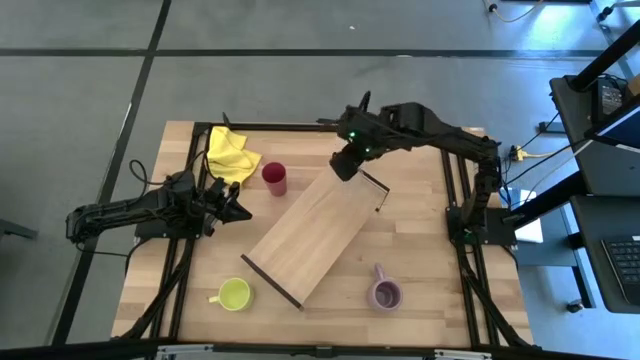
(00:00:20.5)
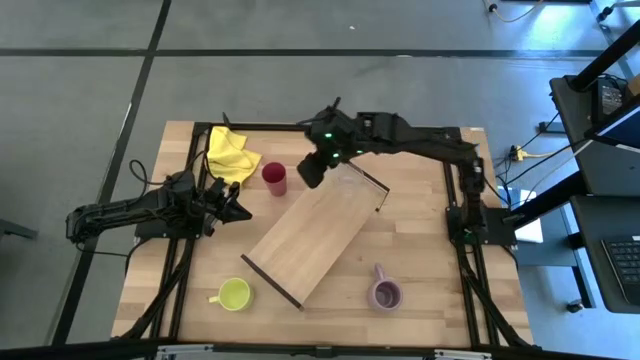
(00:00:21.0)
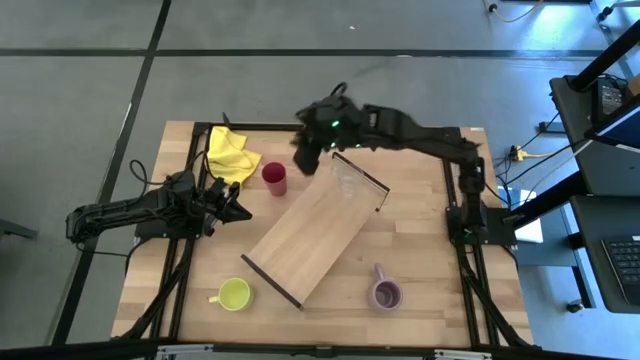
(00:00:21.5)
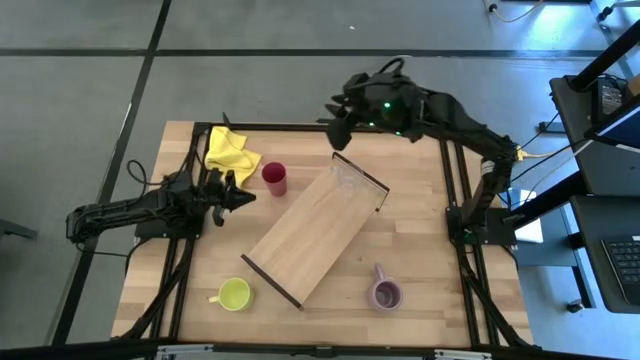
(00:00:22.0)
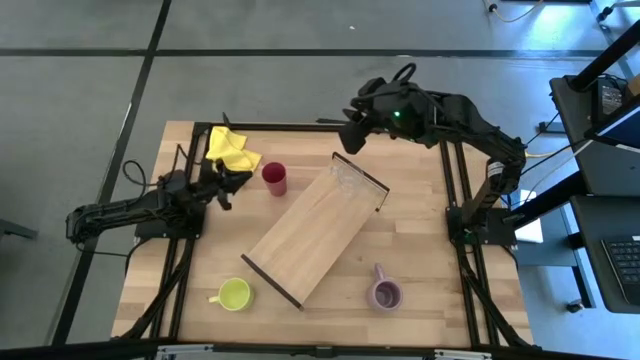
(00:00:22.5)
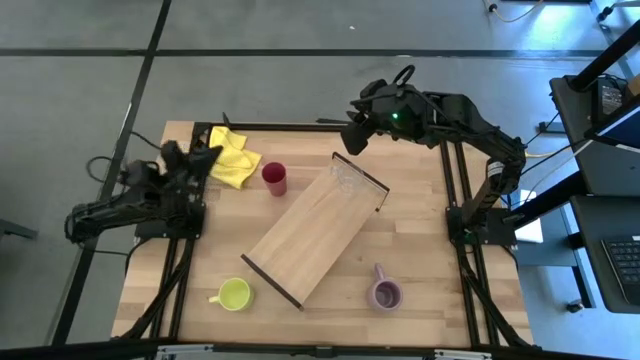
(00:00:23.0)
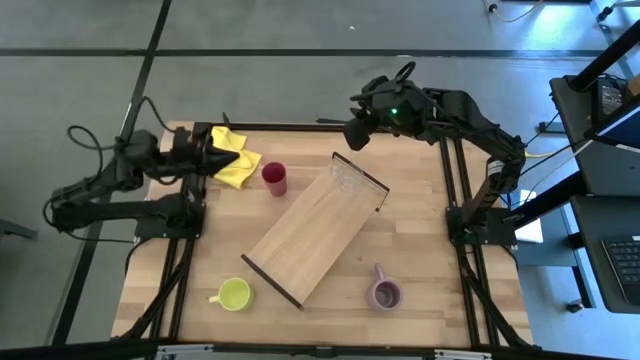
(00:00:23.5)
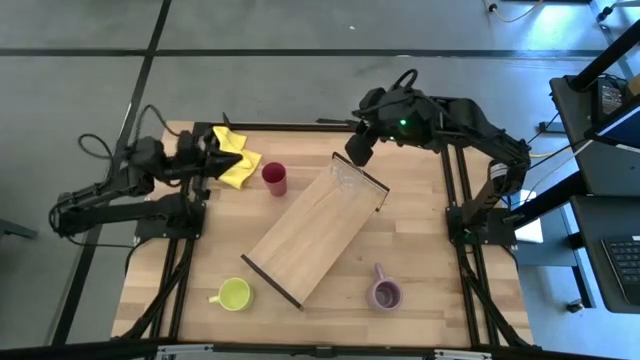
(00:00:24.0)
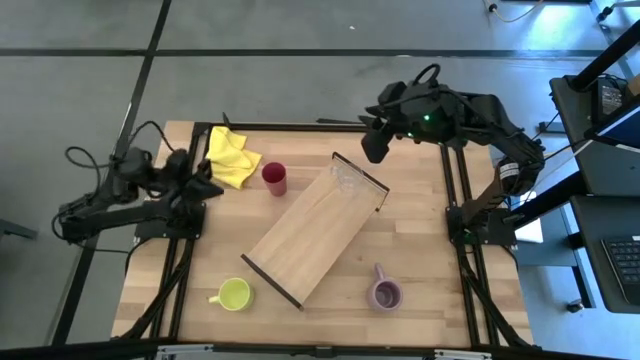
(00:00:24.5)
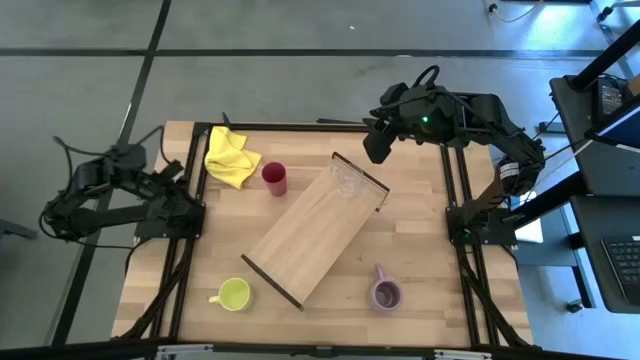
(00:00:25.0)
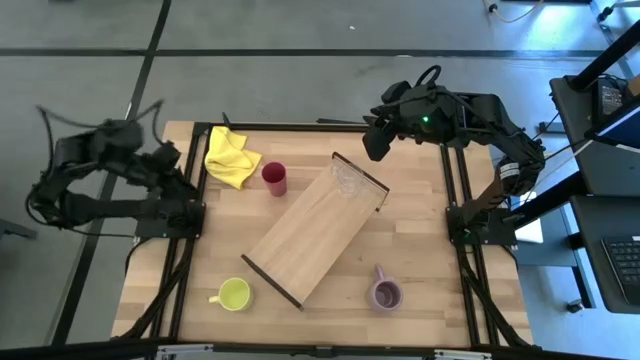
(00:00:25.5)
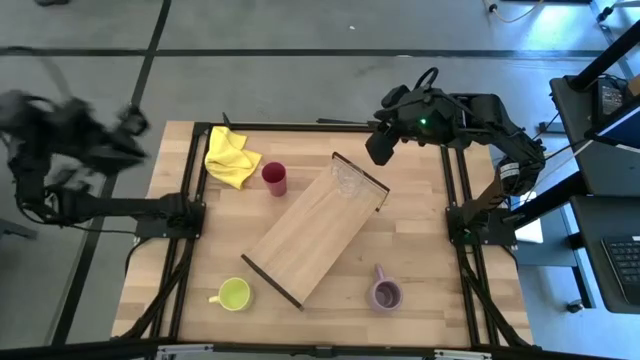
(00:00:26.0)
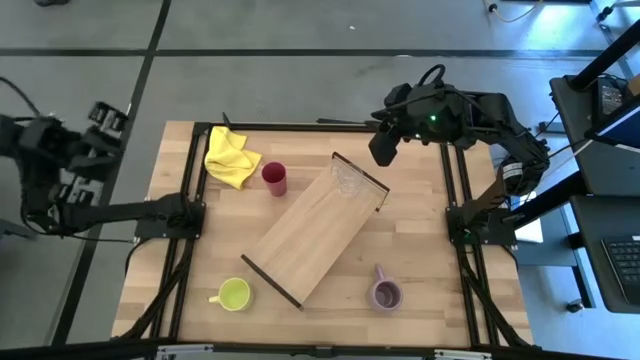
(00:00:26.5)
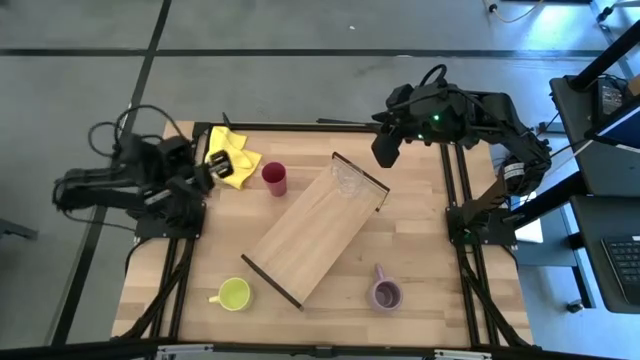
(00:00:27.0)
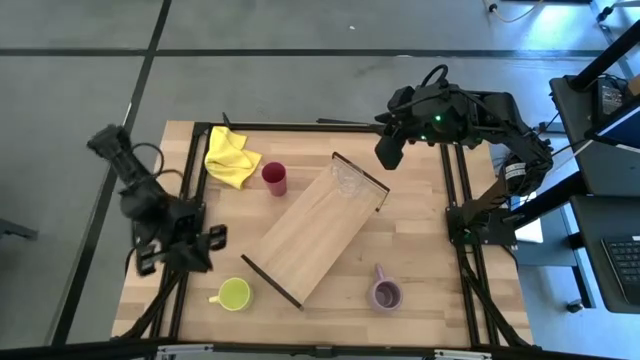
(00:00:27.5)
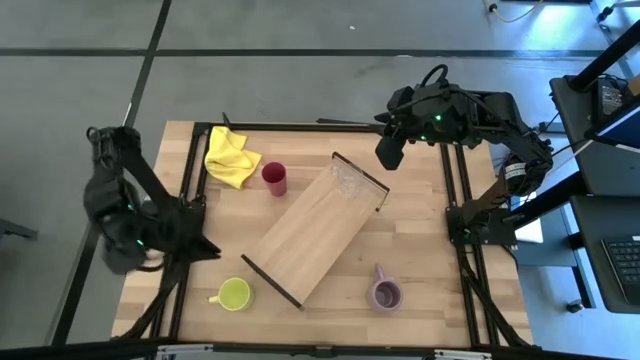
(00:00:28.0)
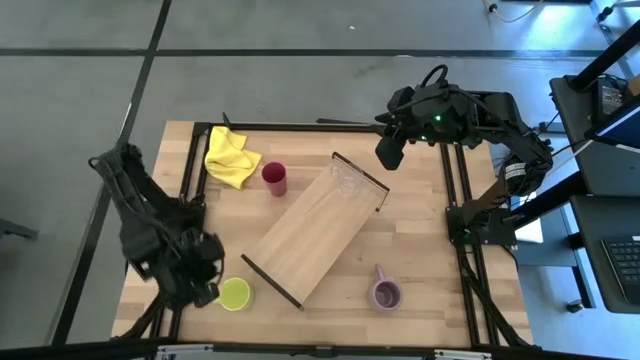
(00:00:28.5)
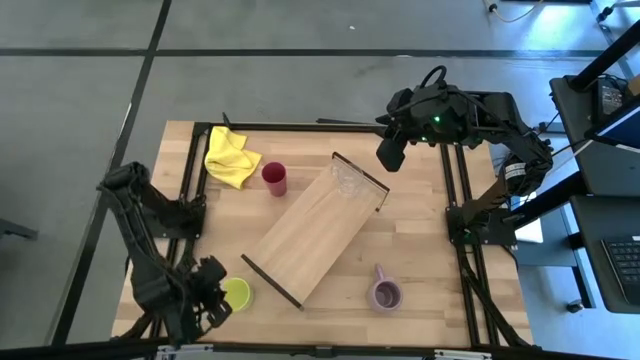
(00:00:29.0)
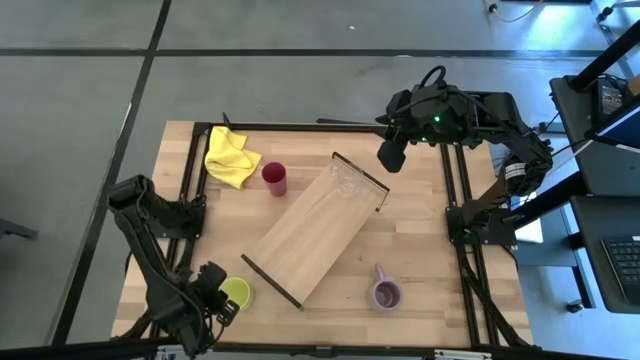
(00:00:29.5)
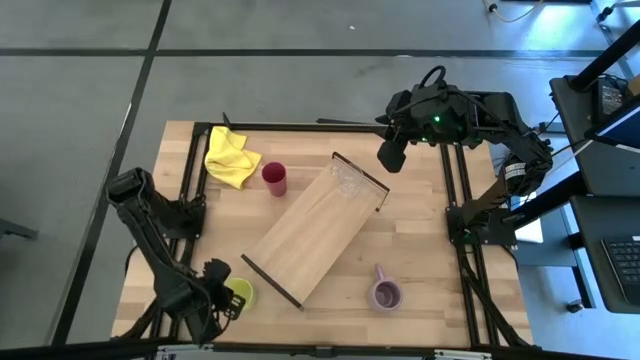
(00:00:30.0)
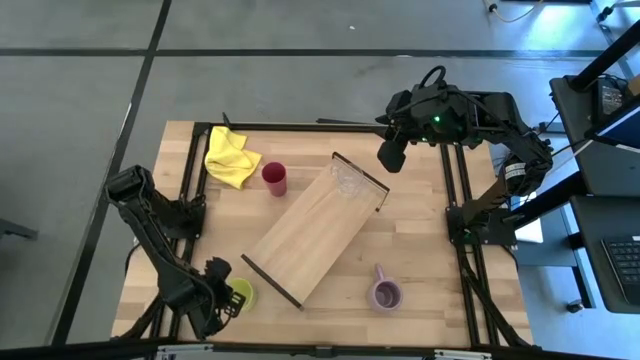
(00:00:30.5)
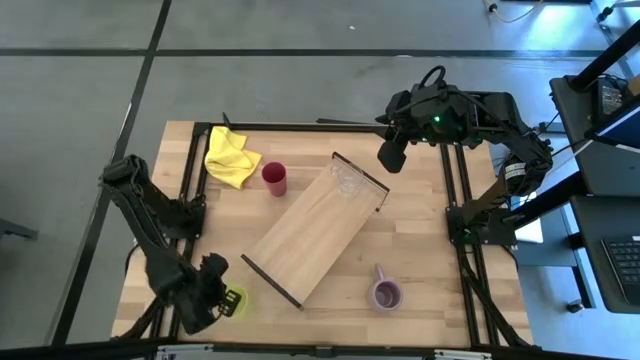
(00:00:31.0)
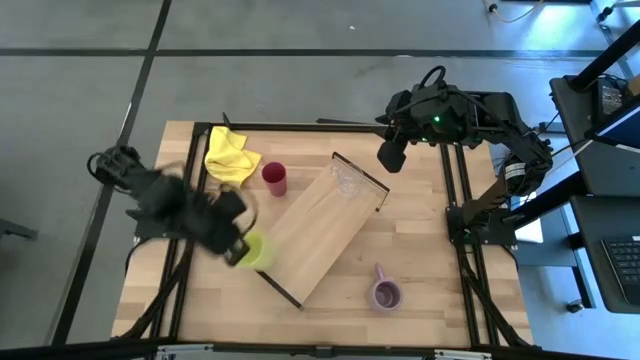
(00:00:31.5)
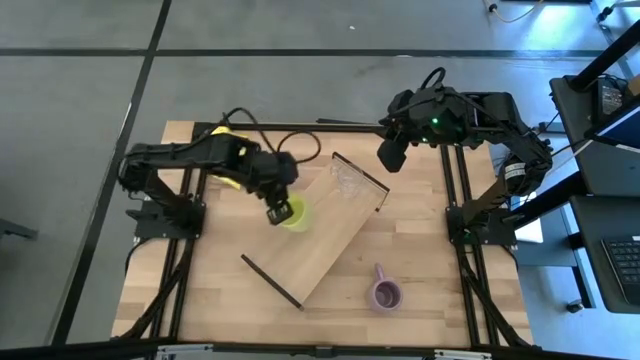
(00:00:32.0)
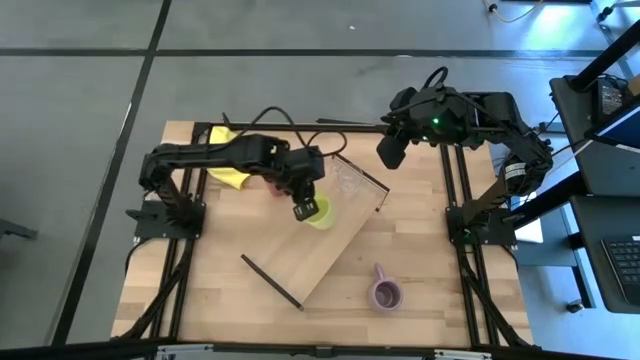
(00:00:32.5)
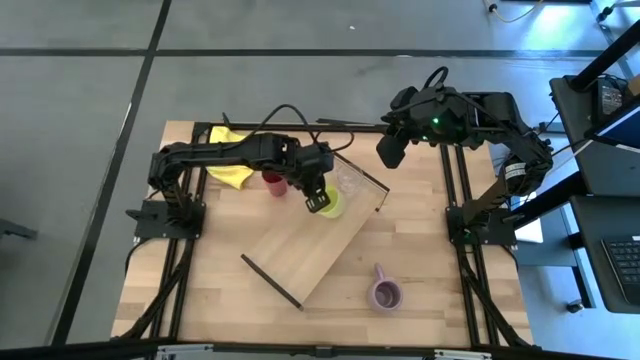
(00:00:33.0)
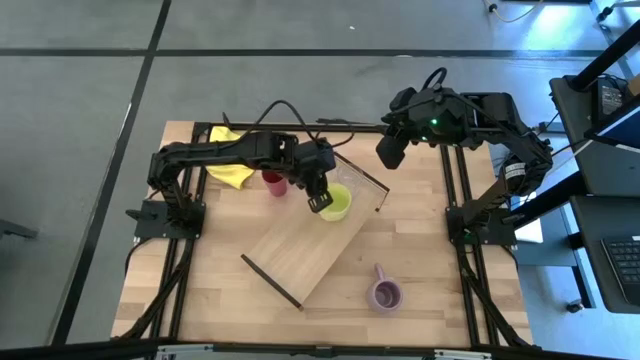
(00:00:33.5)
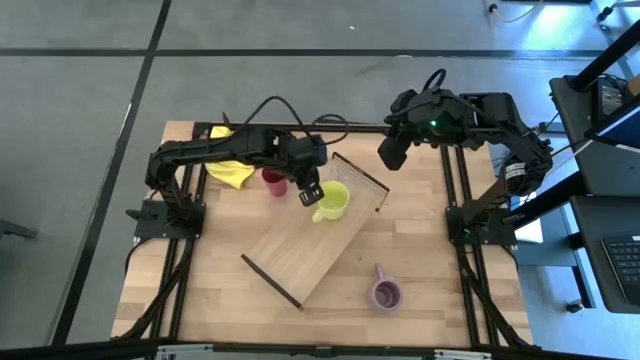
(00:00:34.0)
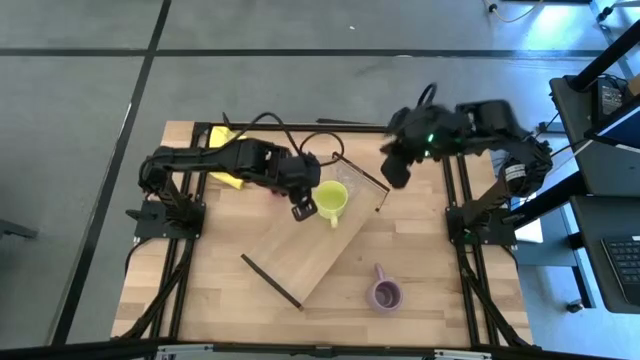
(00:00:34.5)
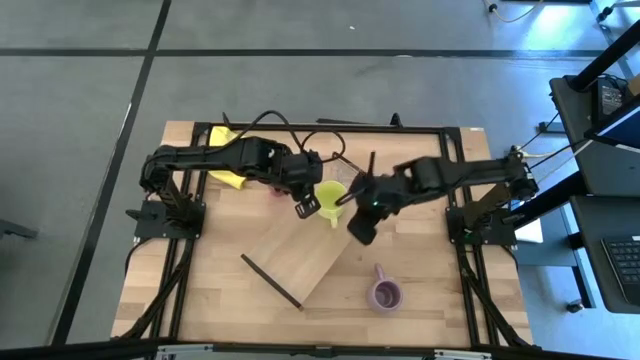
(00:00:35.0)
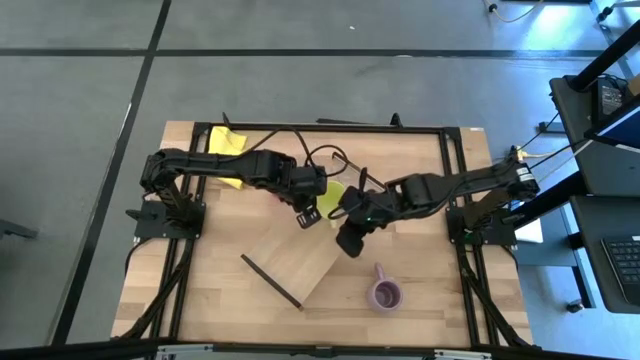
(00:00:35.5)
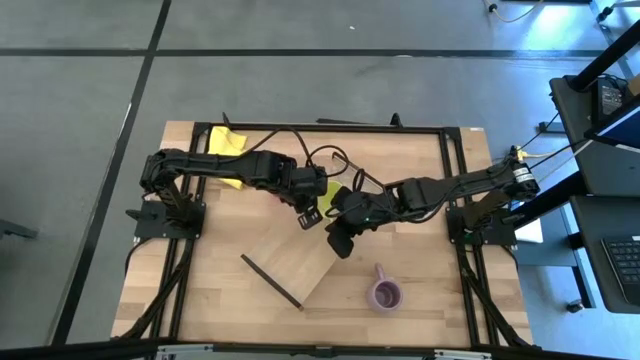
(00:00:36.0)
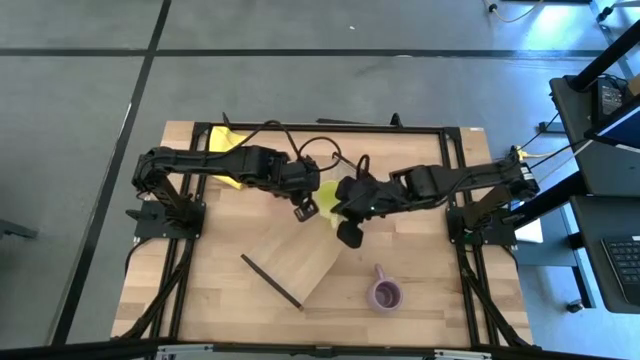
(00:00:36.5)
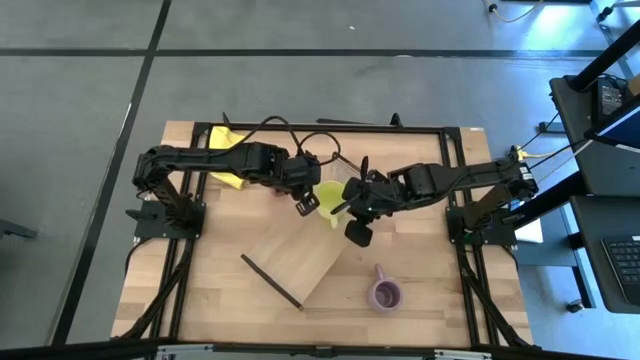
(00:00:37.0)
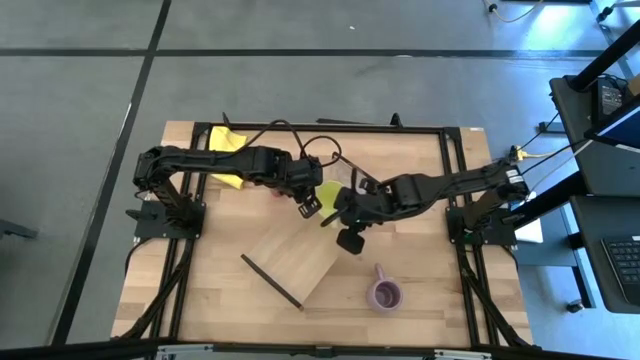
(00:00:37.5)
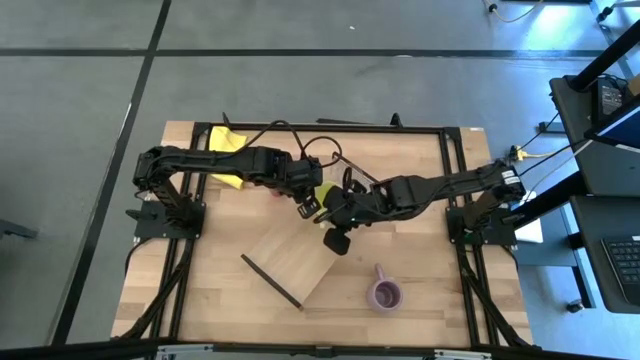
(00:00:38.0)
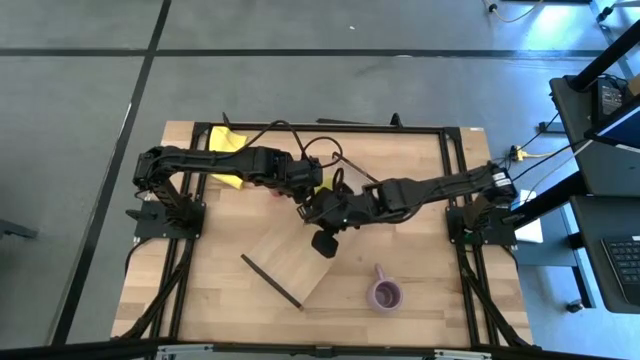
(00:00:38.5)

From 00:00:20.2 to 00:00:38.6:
Task: Stack small to large cups/mugs on shelf
Put the yellow mug on the shelf

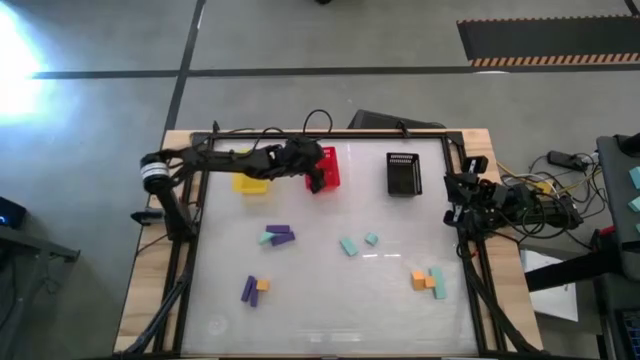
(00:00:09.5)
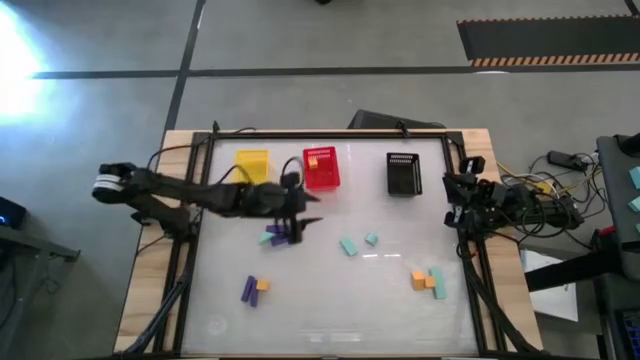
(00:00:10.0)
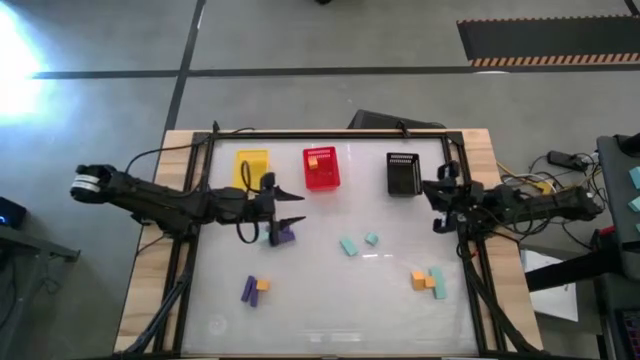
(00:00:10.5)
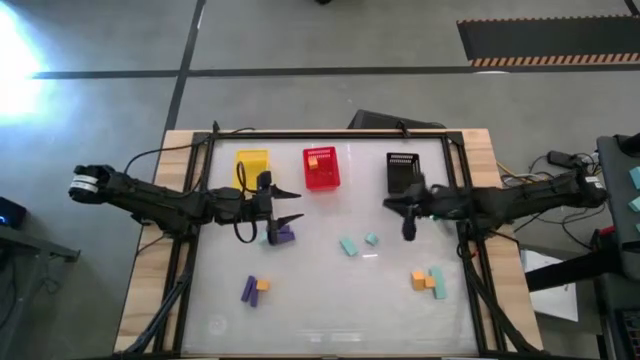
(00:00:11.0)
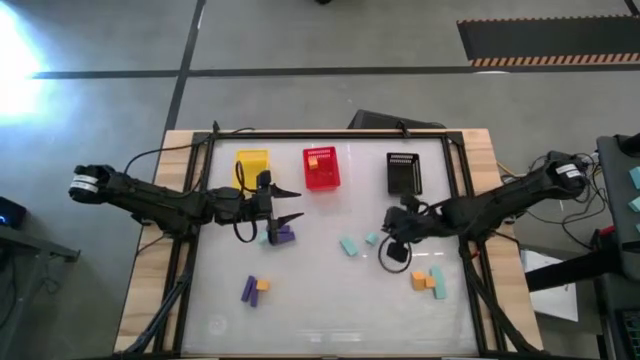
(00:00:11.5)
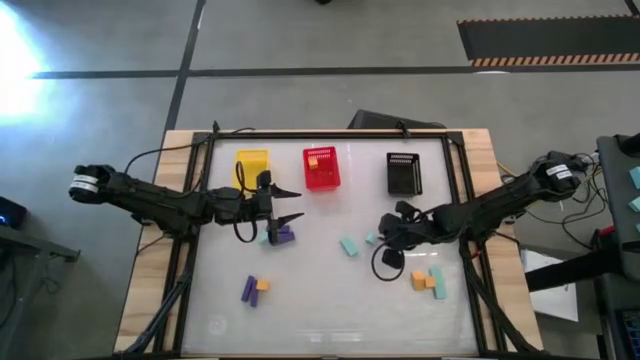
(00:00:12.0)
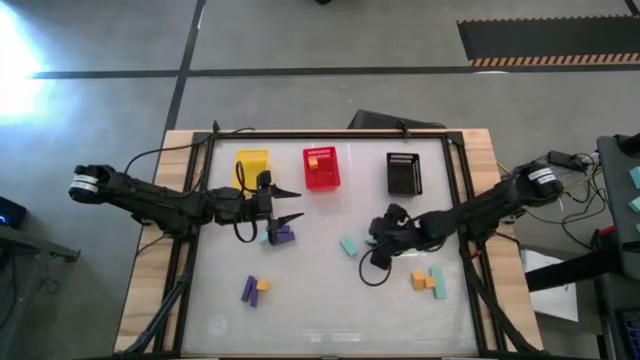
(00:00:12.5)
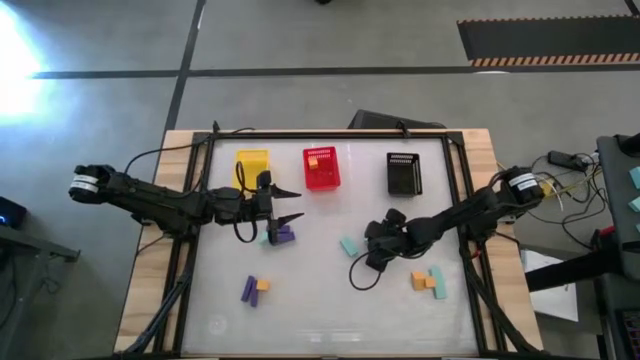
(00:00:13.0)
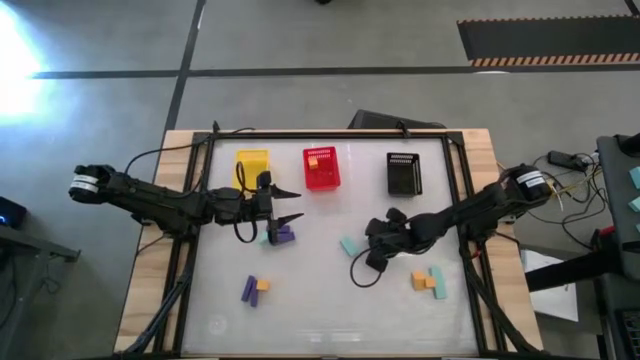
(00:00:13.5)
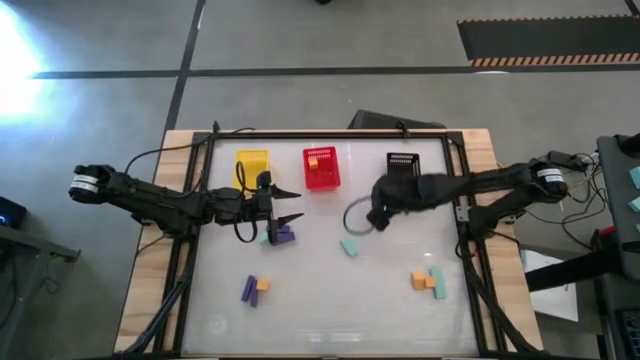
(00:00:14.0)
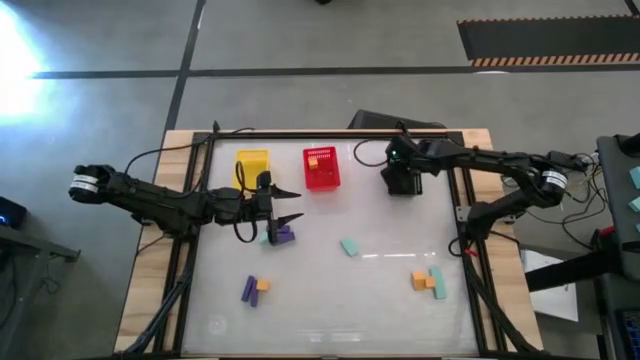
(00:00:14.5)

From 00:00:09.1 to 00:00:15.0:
Task: Sort & place blocks by color
Put the blue block into the black bin
